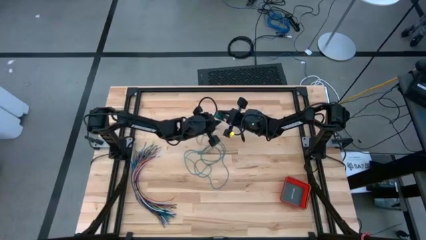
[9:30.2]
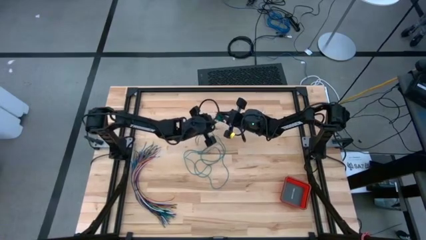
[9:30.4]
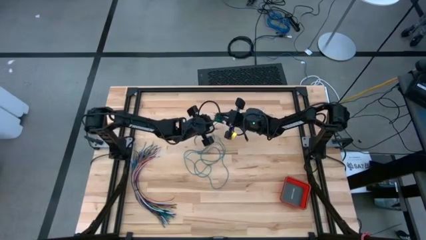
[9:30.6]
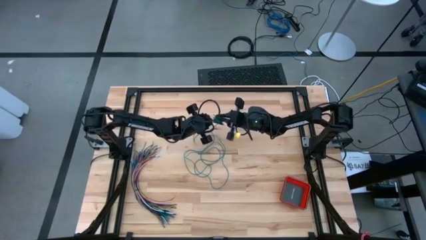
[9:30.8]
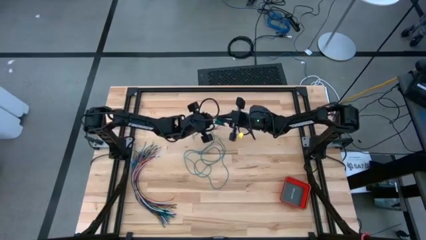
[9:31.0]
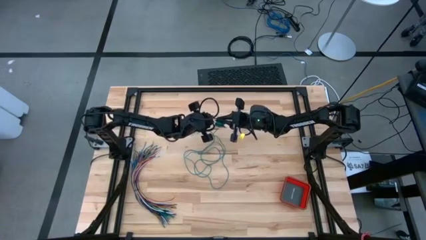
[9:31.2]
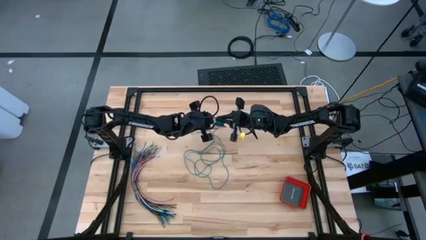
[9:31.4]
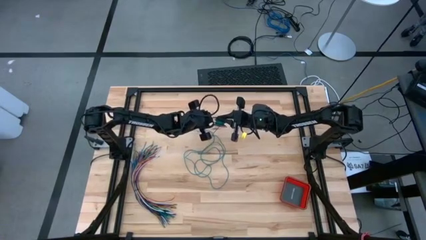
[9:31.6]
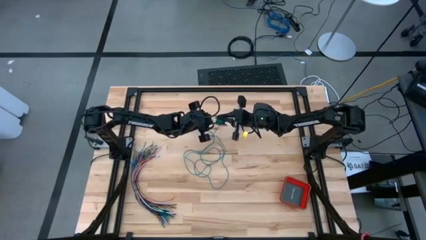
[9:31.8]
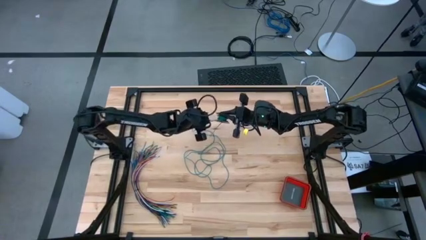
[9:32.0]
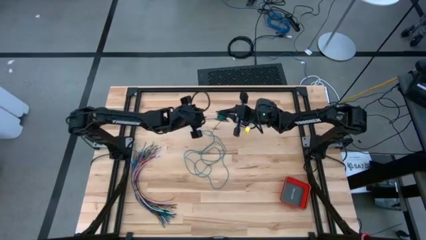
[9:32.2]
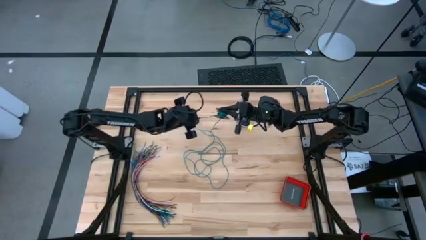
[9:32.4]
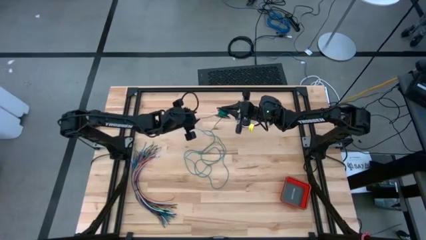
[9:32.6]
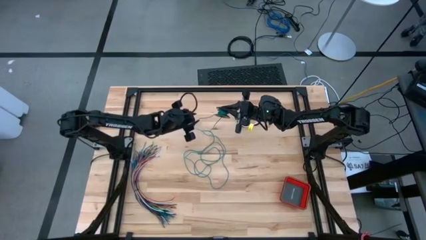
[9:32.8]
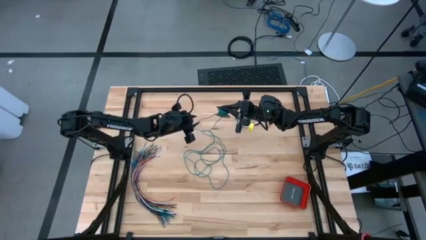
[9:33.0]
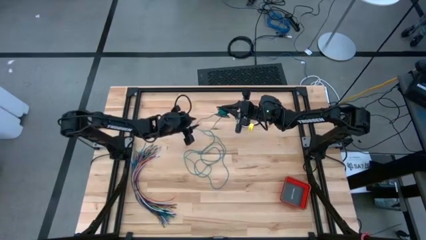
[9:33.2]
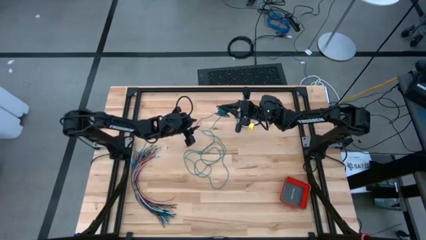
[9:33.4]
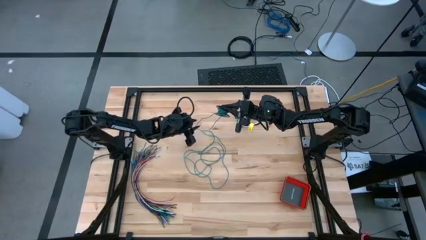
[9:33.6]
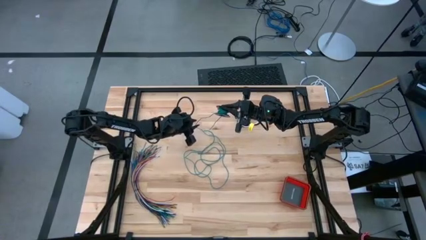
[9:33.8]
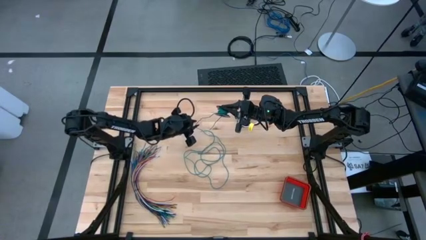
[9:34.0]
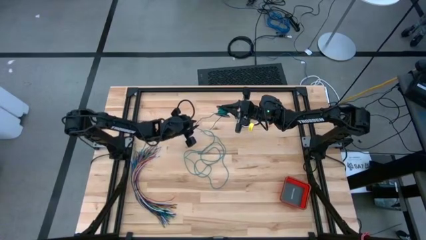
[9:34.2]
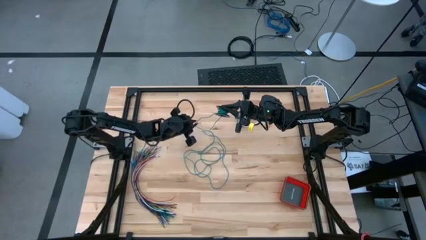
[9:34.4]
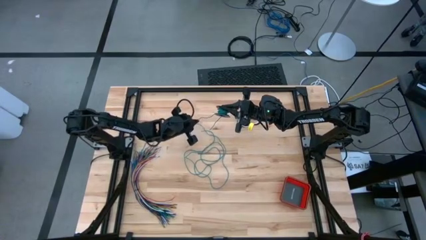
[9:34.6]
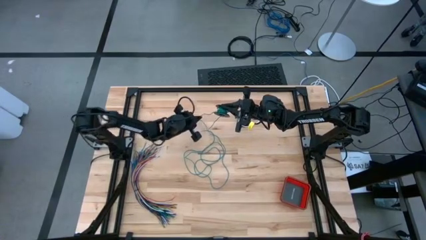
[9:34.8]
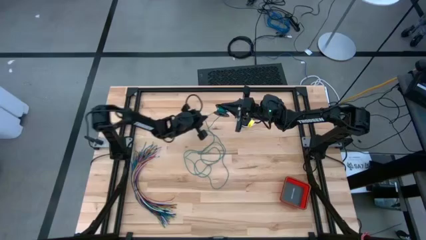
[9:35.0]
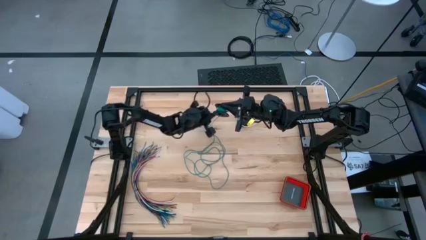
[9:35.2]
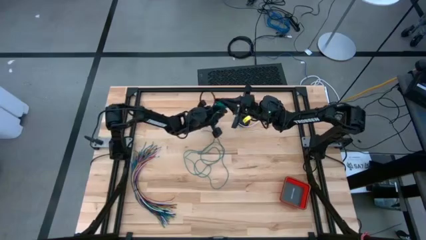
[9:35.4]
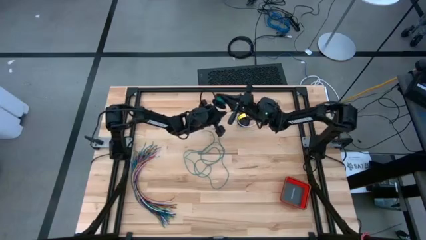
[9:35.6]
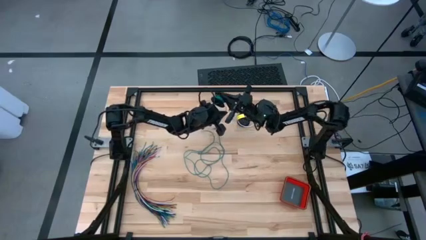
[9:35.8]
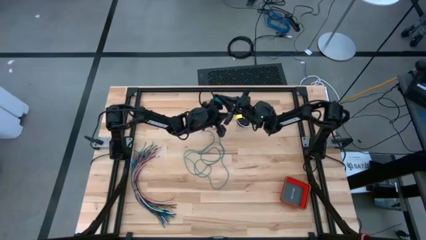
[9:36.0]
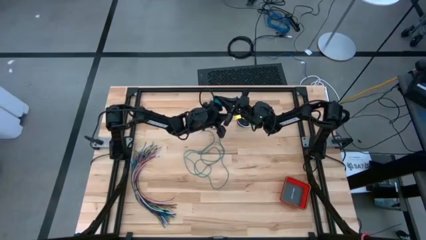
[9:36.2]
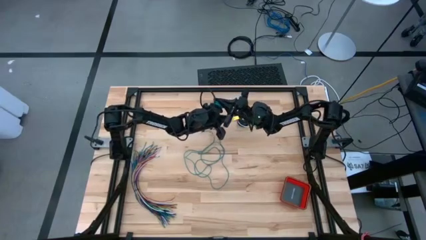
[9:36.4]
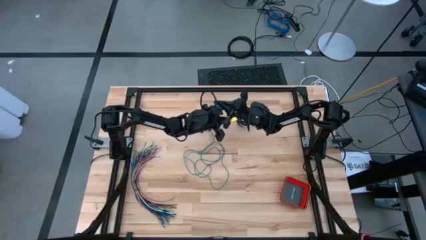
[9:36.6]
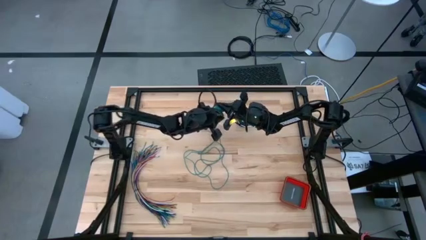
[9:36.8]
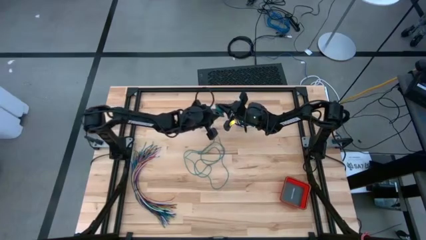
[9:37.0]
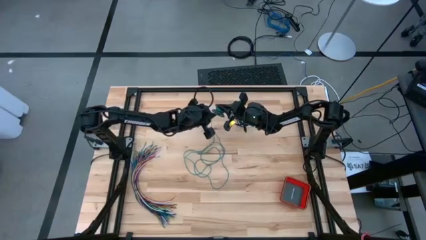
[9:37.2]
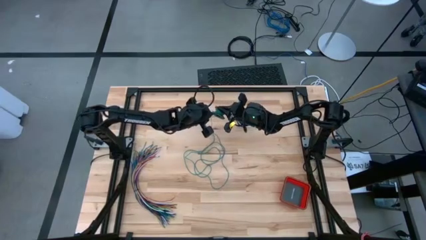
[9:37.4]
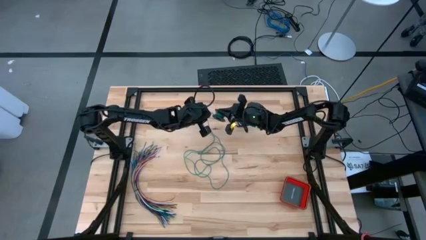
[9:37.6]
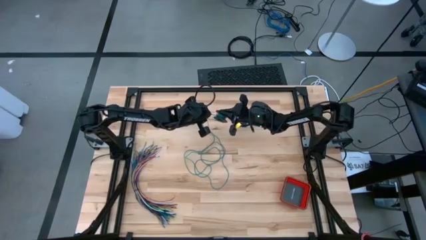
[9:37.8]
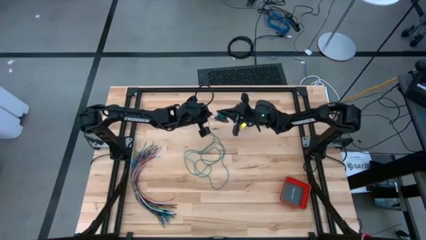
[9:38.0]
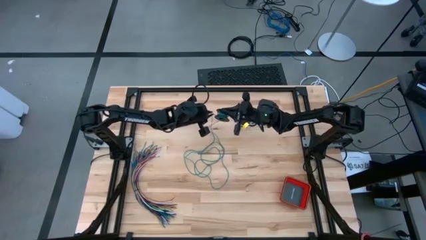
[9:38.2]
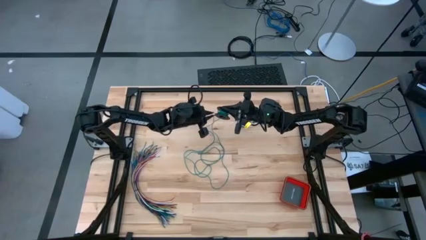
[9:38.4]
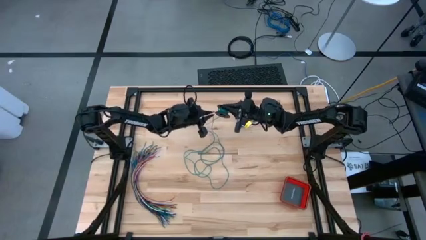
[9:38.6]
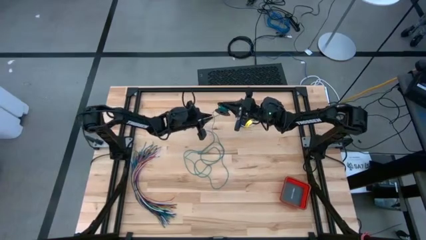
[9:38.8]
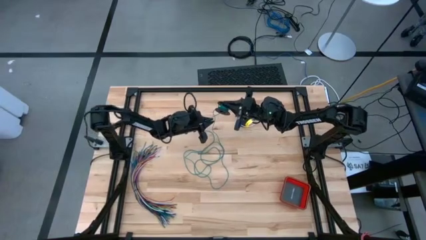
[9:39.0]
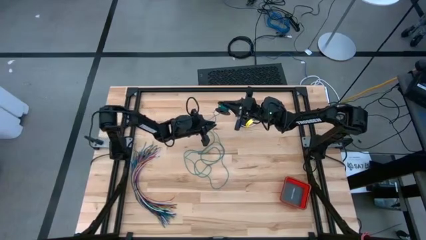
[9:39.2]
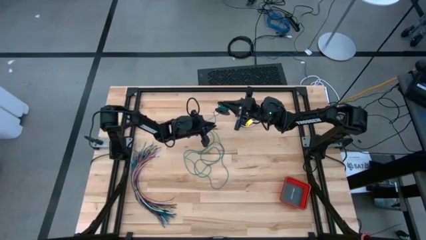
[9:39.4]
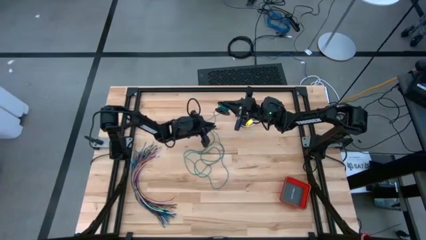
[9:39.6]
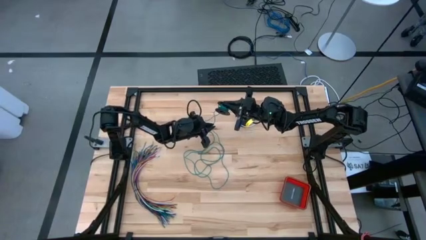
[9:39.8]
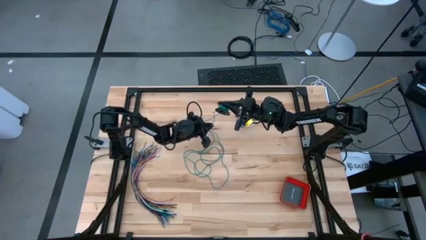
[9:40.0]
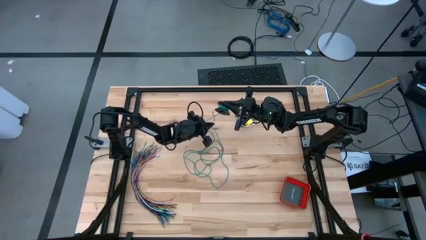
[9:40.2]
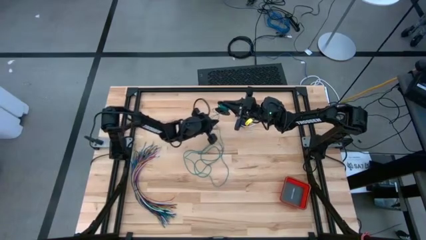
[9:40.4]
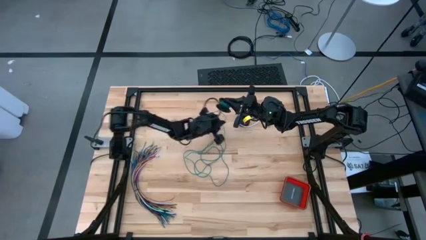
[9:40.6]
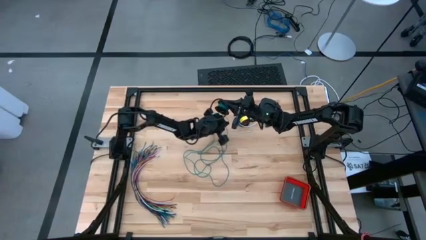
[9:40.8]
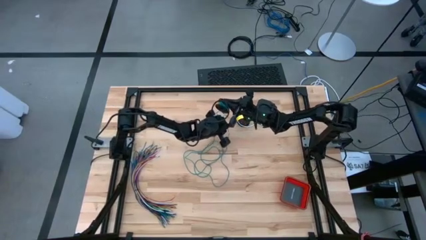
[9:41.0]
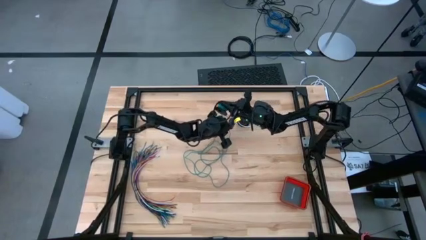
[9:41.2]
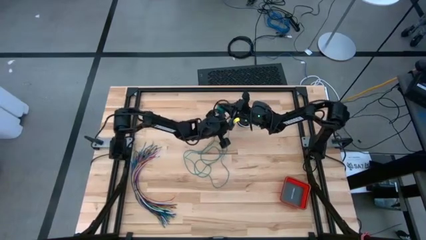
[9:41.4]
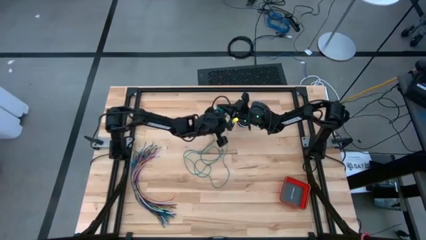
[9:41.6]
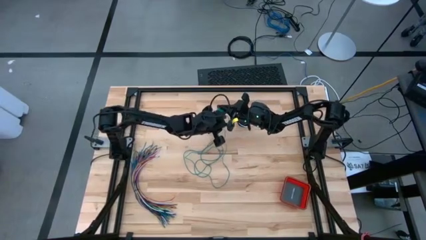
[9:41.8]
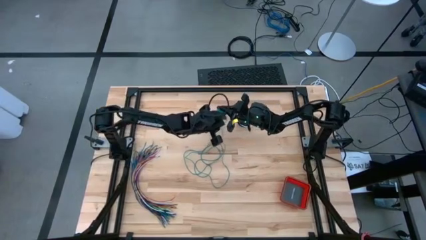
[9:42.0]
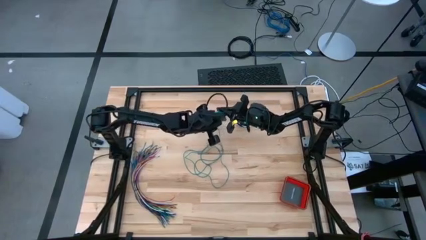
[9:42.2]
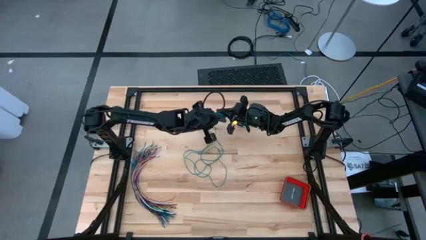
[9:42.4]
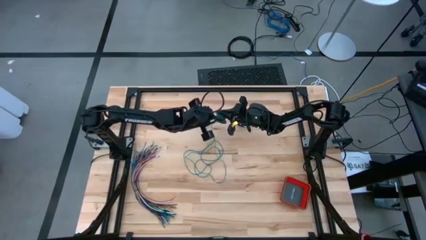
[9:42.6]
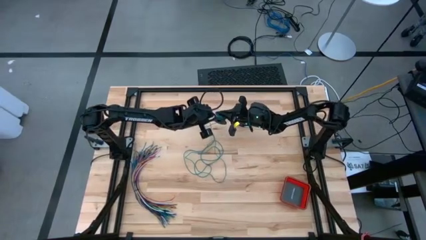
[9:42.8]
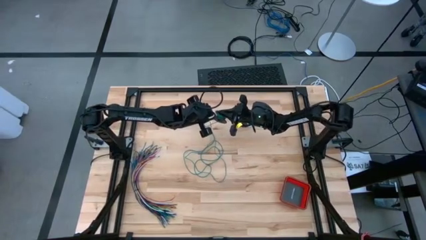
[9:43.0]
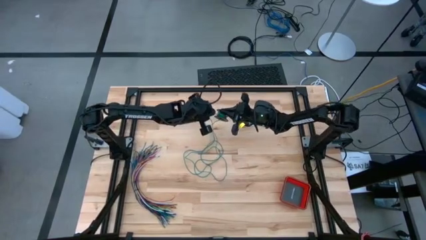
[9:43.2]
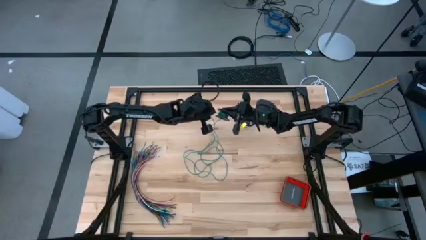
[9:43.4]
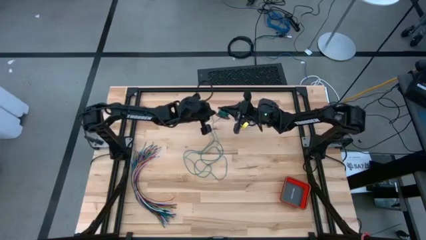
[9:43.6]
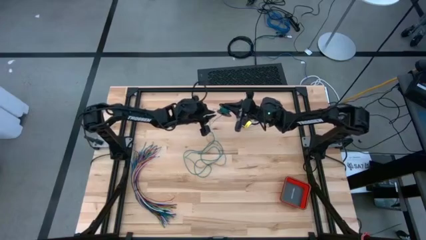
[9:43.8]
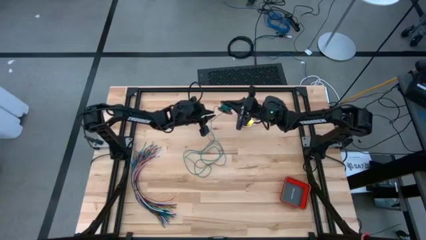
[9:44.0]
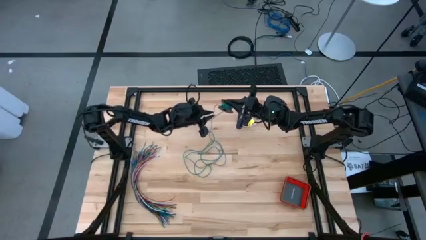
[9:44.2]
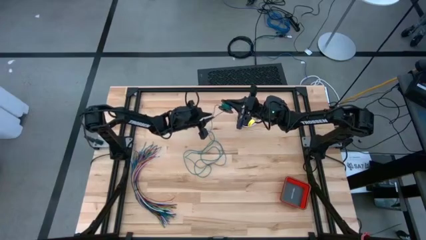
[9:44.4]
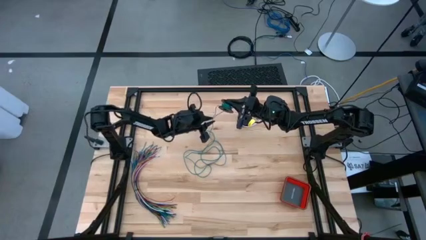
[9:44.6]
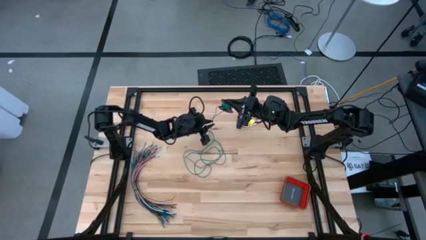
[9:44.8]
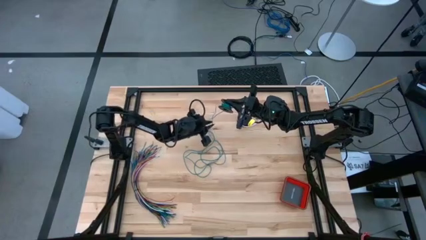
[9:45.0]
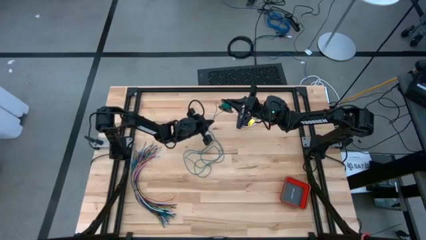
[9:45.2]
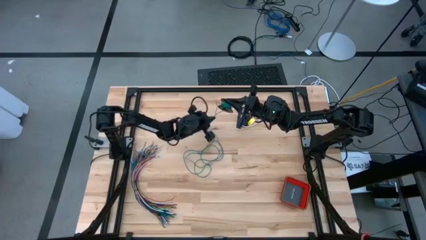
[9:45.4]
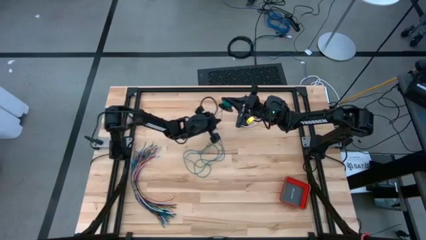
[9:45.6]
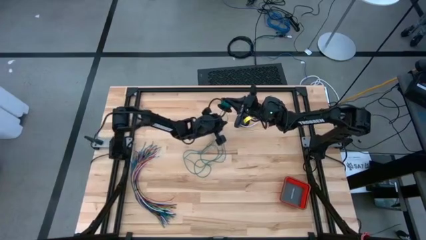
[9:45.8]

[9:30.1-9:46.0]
Task: Coil cords
Coil the green wire onto the spool
